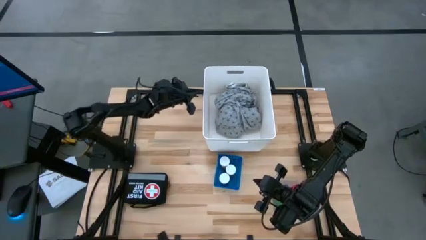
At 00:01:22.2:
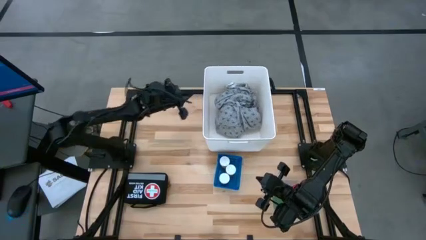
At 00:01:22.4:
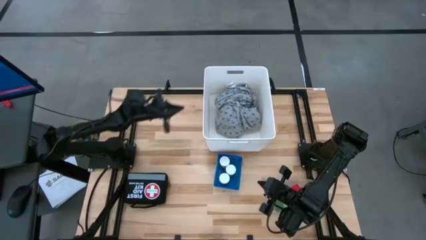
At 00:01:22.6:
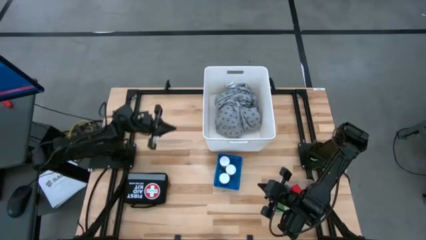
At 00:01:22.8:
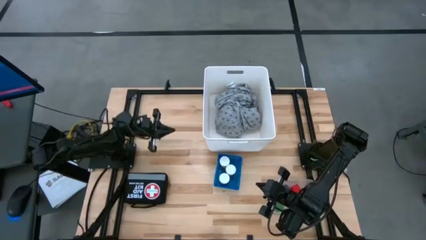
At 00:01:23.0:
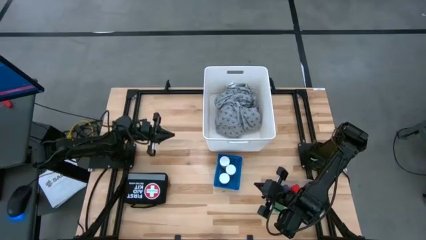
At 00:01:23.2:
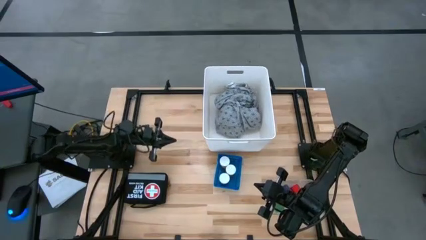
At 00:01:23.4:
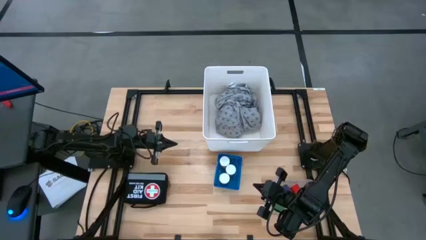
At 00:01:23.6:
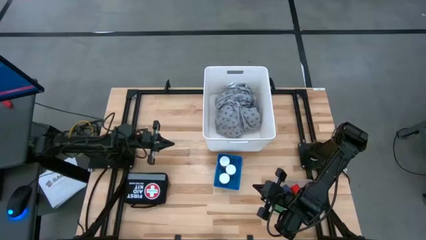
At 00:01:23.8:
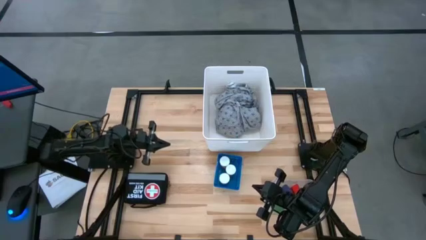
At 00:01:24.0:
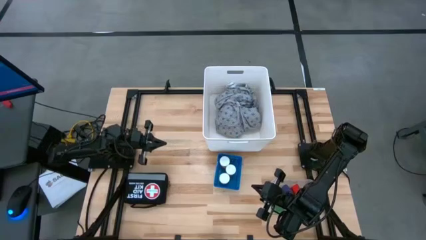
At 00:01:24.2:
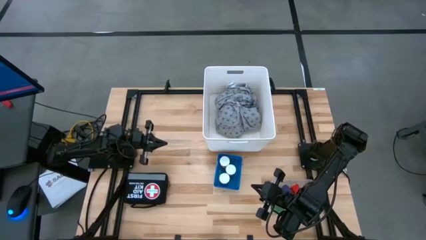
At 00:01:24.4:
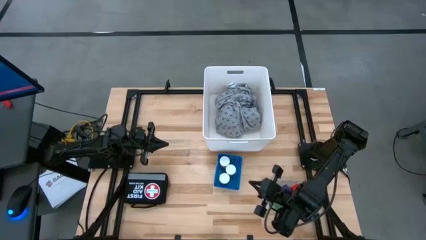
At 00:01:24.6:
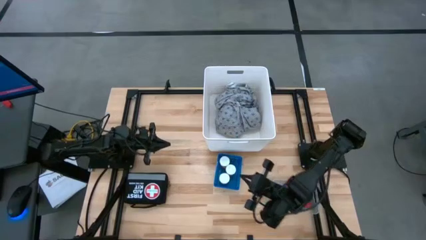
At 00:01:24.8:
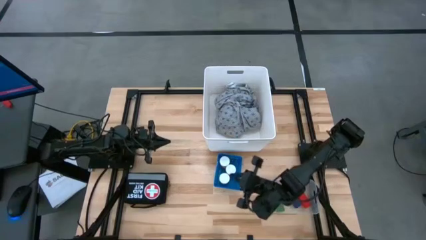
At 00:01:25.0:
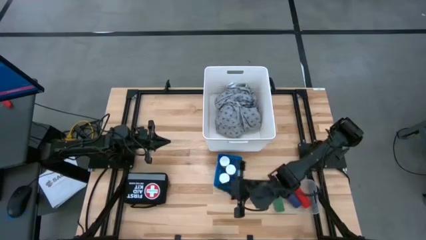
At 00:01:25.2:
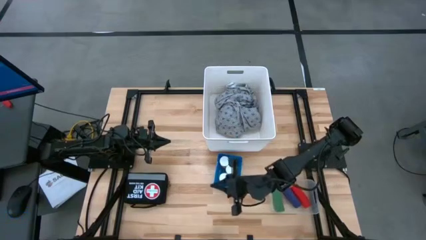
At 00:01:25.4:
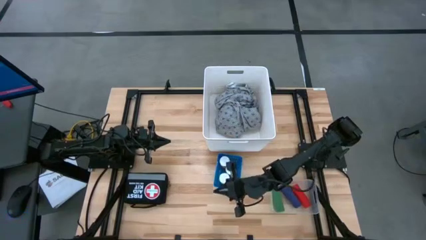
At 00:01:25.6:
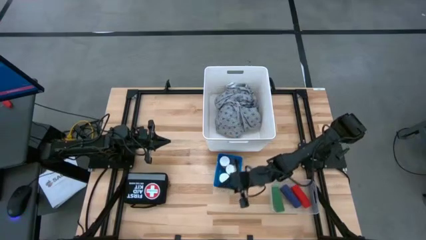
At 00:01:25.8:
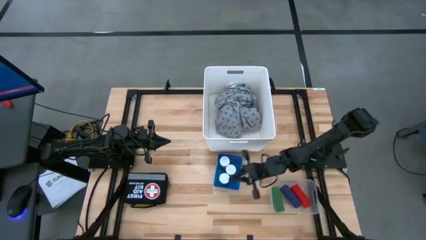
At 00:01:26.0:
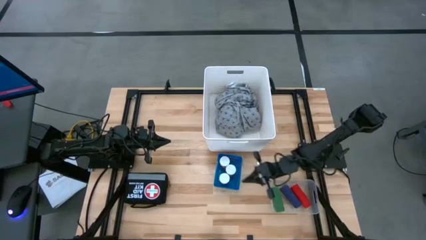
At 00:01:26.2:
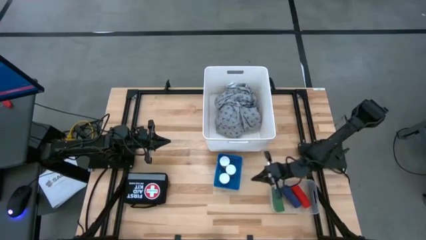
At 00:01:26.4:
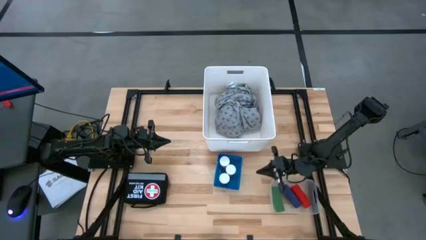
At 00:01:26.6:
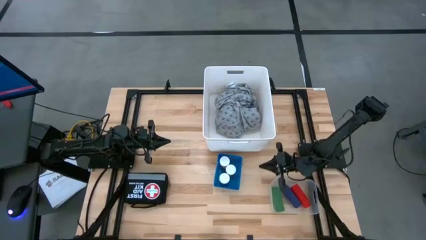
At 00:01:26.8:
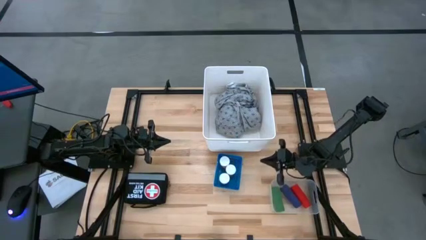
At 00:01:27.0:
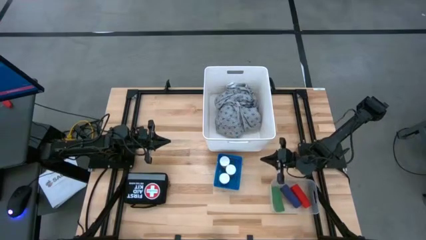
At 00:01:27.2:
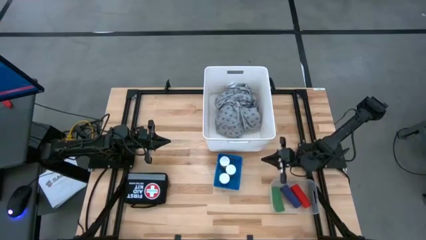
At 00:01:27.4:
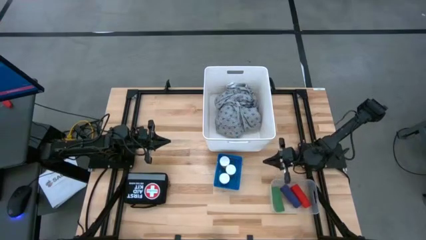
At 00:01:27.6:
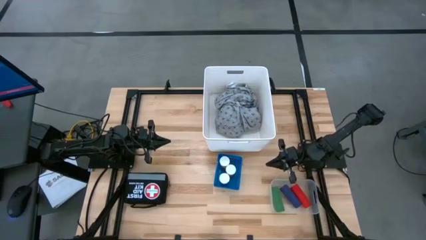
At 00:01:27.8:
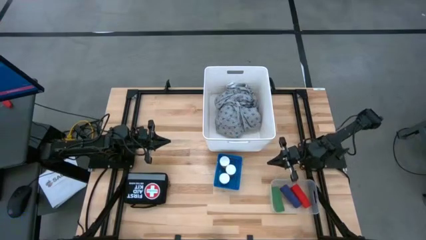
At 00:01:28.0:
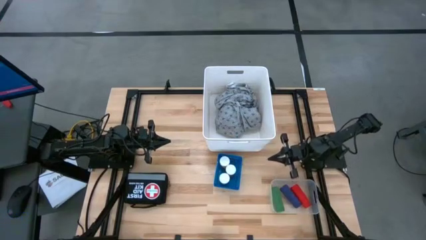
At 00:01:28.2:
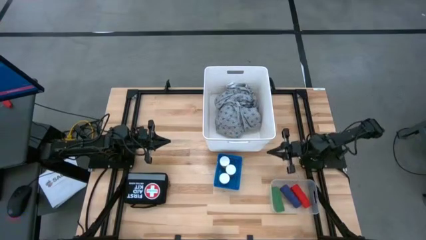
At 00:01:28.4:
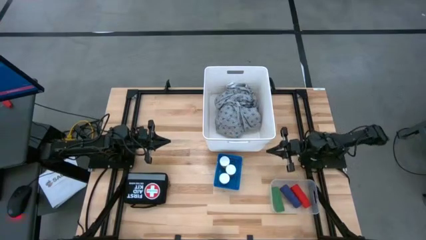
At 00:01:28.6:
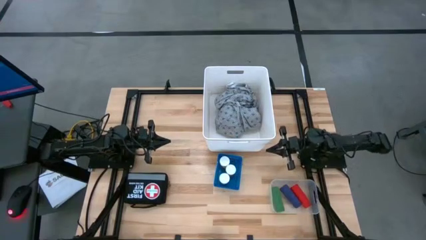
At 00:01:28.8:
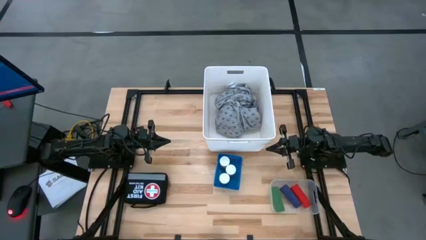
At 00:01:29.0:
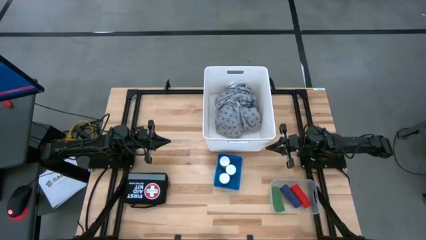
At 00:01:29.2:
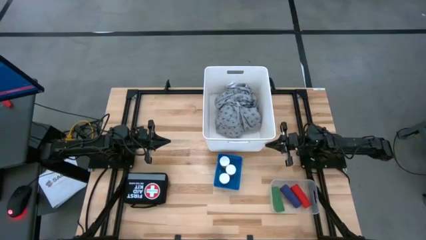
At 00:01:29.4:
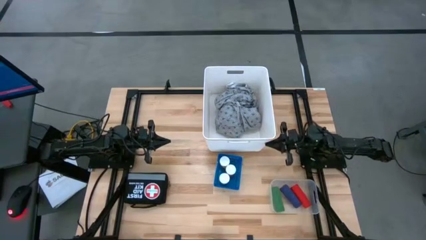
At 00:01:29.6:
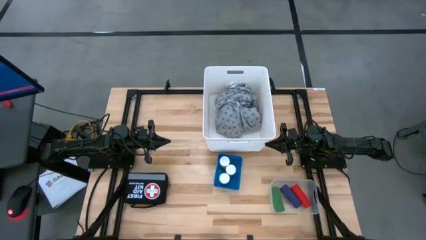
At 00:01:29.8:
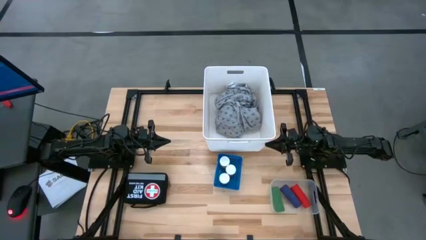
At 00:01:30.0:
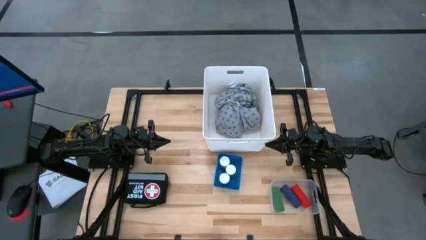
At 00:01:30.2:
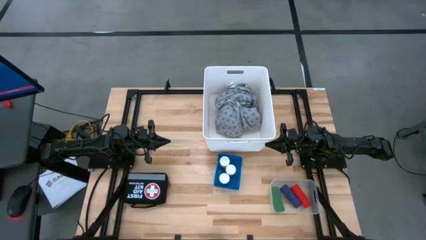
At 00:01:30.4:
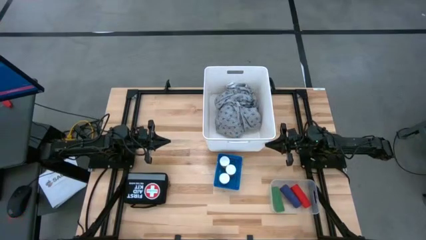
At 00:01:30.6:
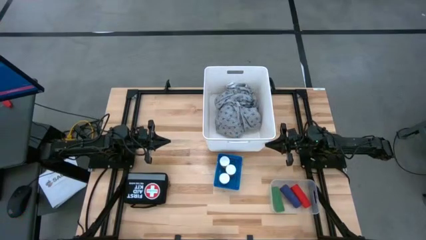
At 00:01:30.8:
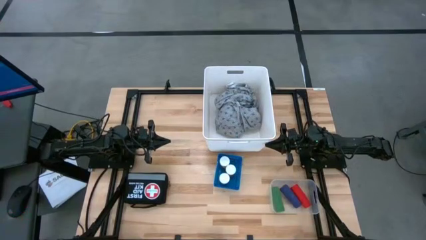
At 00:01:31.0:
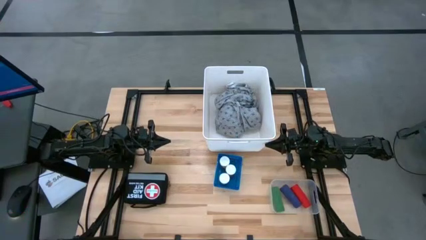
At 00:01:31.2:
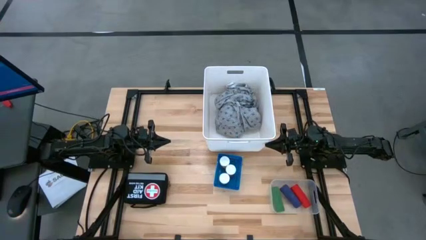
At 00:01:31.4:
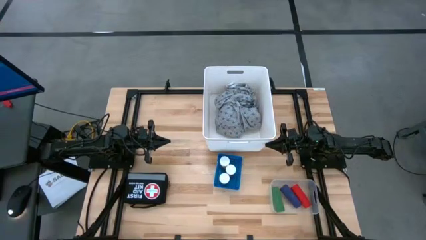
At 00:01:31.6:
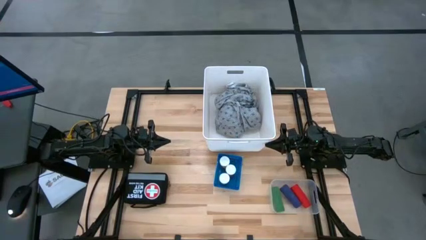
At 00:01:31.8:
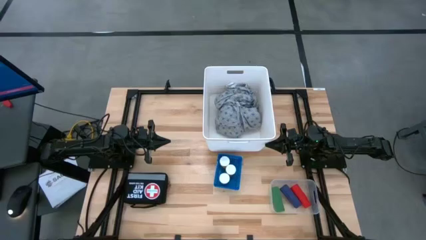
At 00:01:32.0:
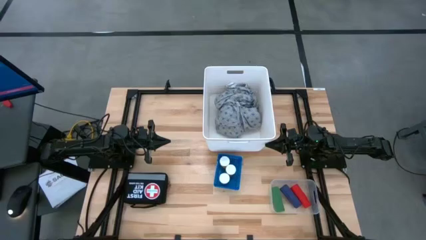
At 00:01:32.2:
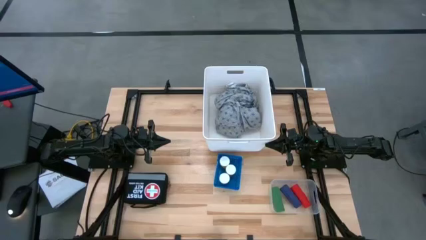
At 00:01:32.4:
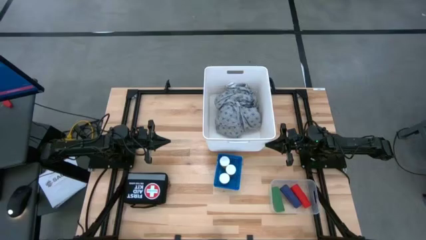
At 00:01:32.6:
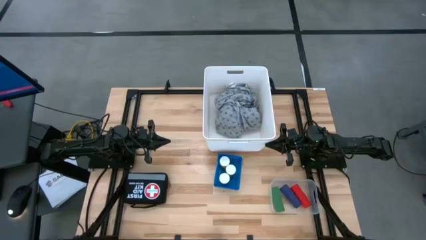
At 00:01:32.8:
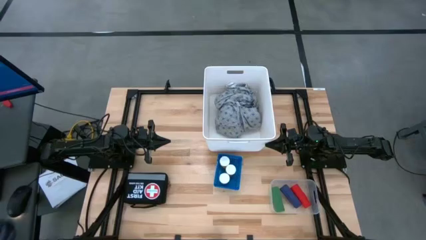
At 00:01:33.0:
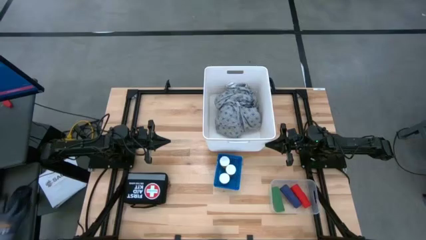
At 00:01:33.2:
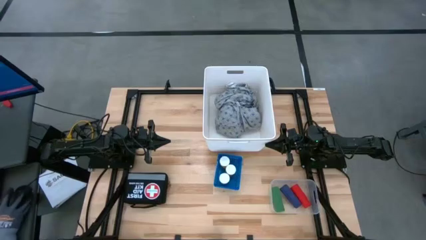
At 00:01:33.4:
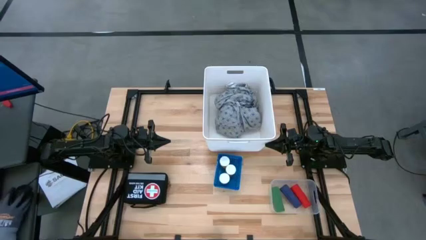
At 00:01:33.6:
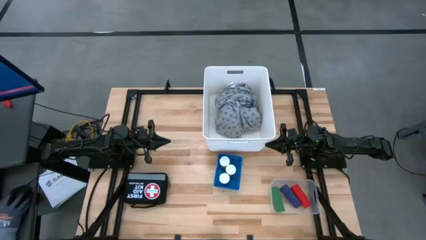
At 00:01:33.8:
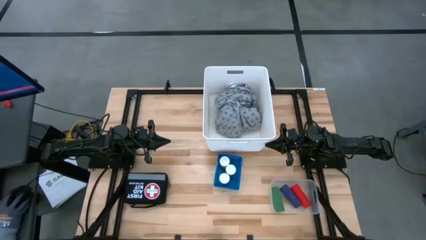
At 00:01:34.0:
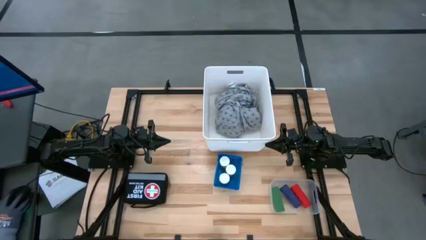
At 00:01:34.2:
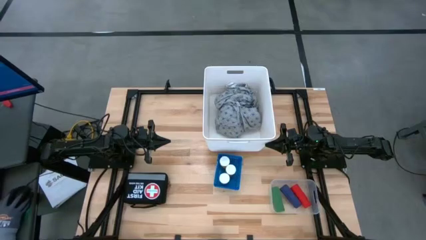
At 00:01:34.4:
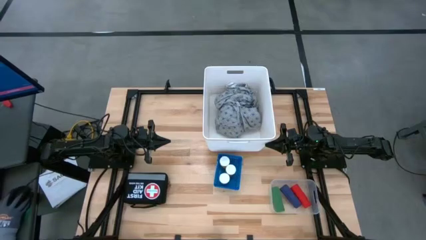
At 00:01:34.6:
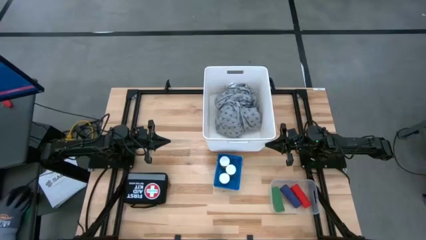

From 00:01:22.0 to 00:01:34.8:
Task: Pick & place medical supplies in basket/bin
Return to Home Position
